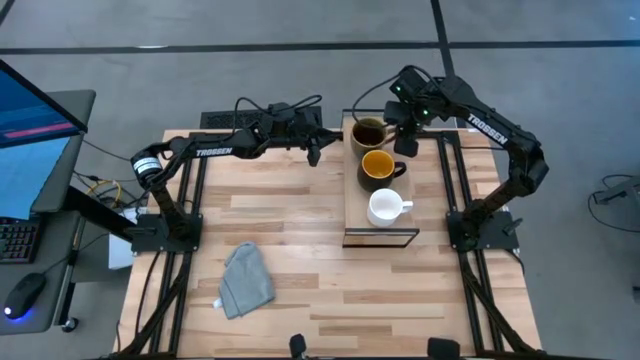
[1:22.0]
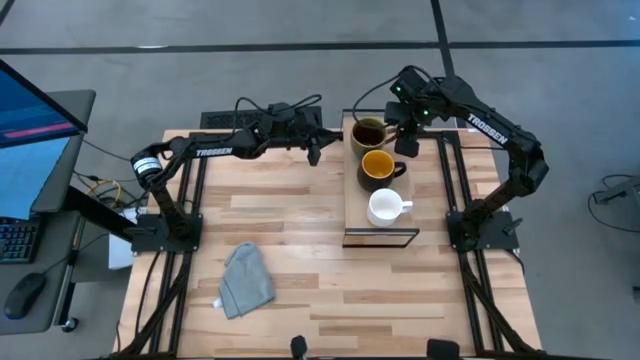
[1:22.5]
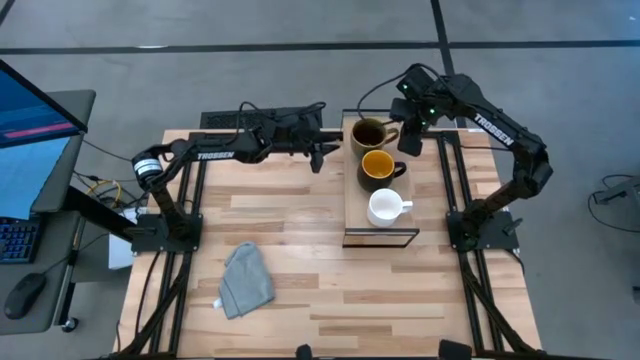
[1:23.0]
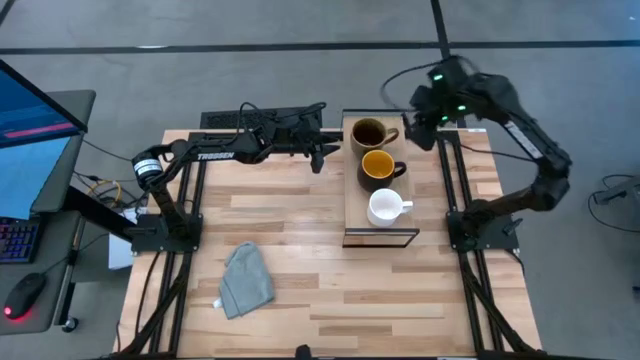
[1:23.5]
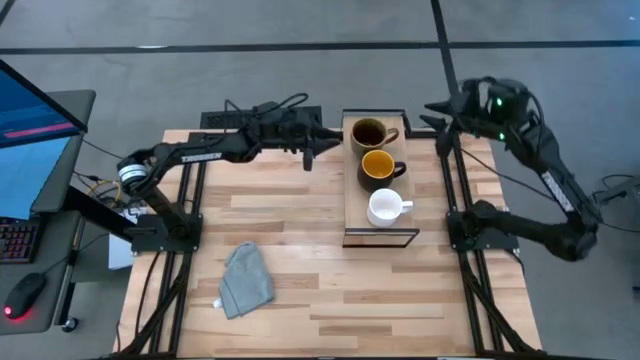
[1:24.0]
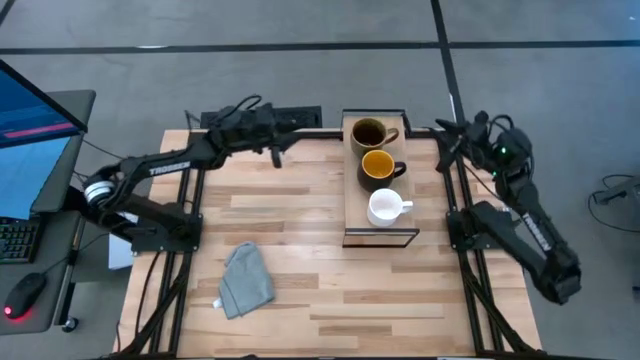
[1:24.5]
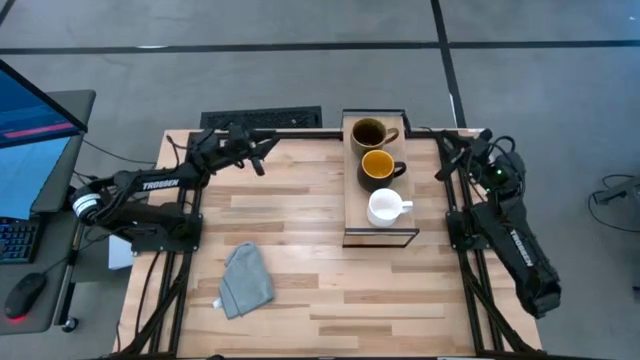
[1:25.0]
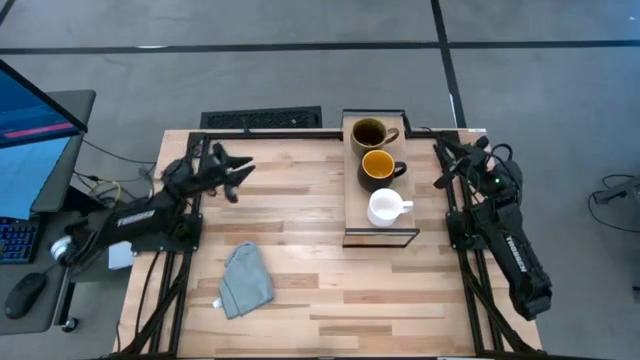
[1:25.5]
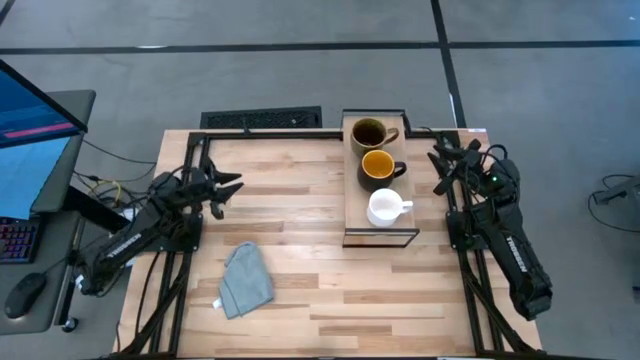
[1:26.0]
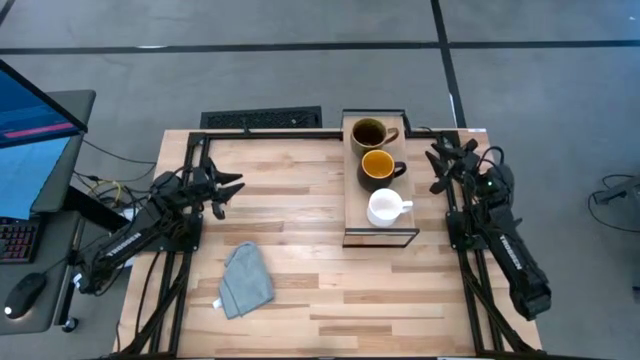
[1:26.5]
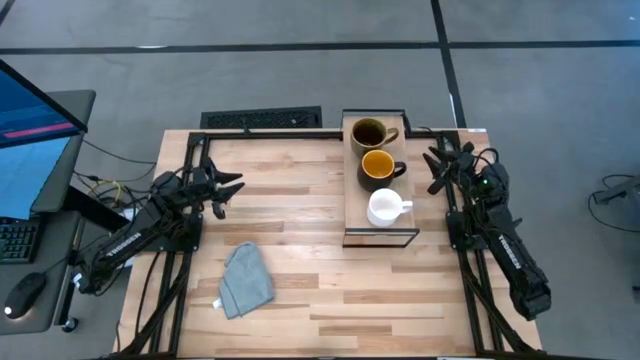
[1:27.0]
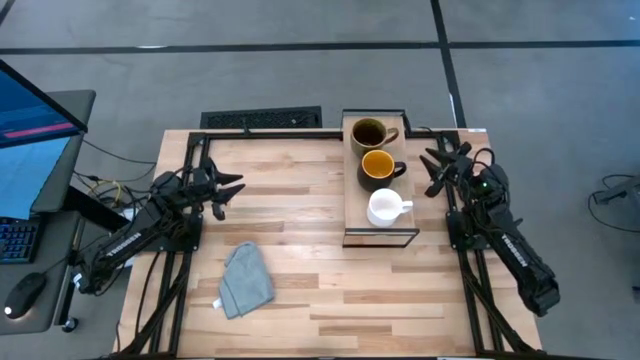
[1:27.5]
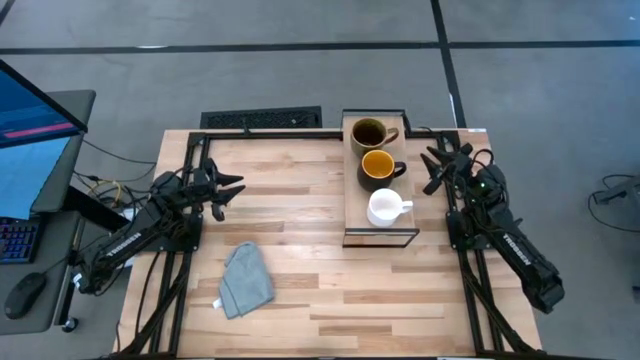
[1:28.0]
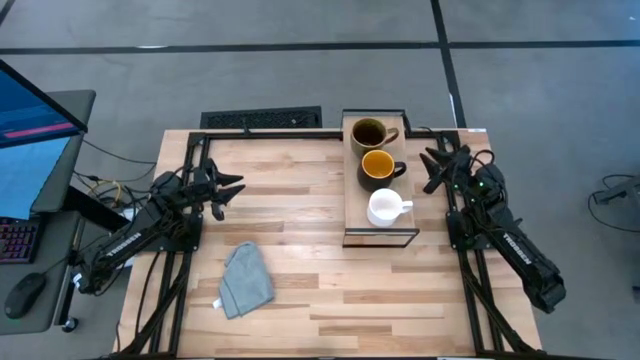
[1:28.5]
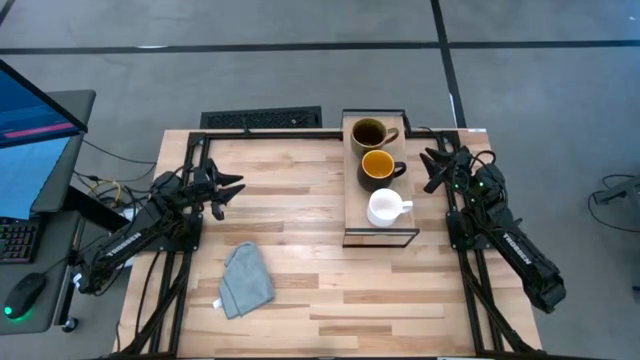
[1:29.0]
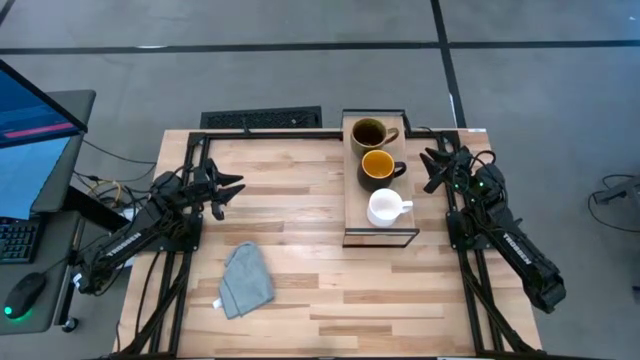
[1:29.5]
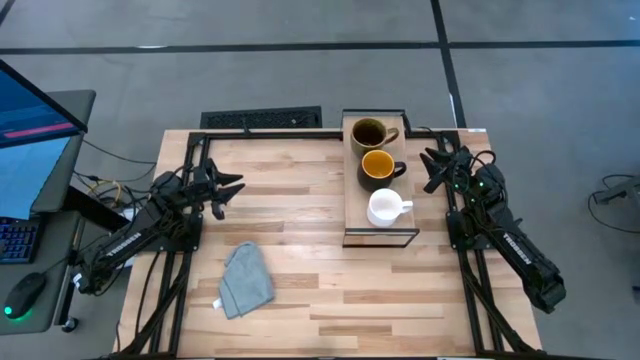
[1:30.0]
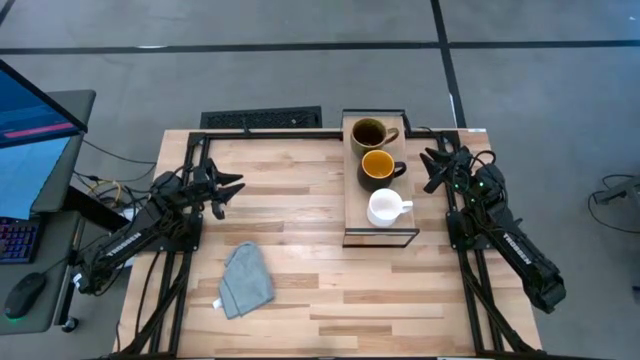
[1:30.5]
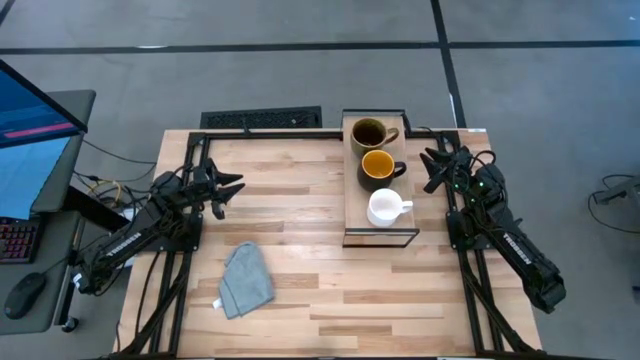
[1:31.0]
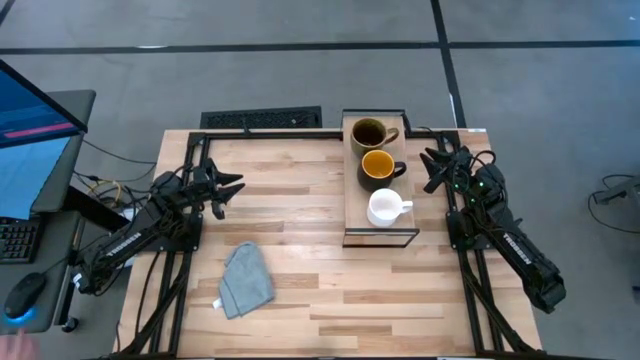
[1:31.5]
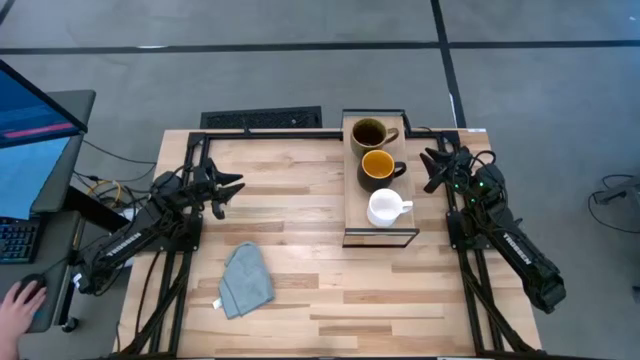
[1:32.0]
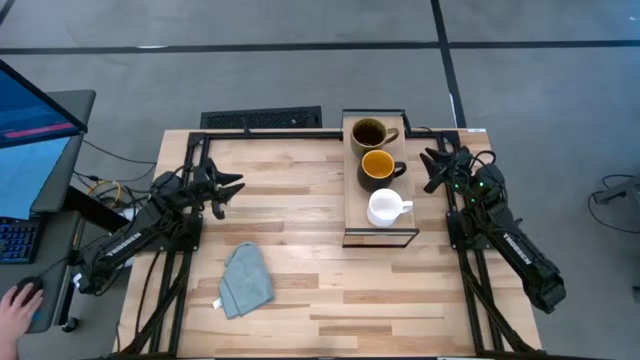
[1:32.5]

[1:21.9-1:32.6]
Task: Stack small to large cups/mugs on shelf
Return to Home Position

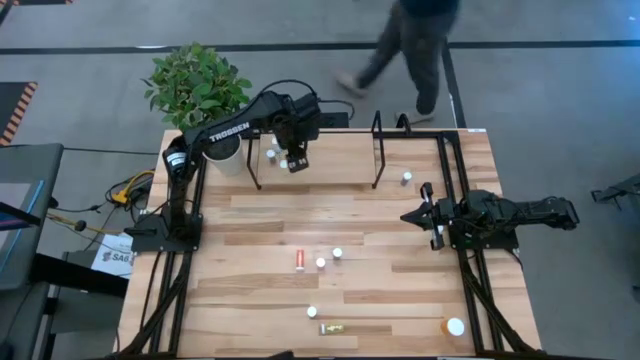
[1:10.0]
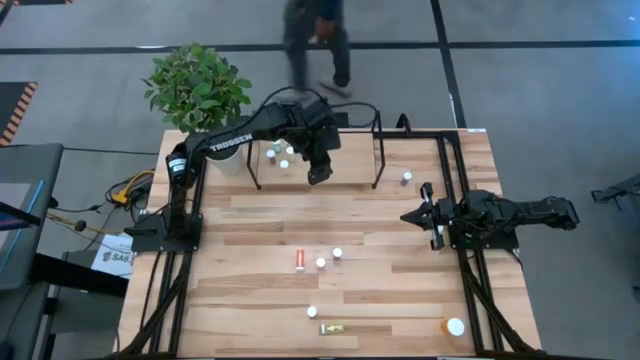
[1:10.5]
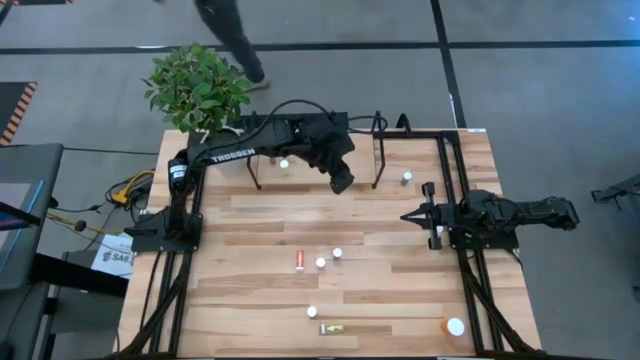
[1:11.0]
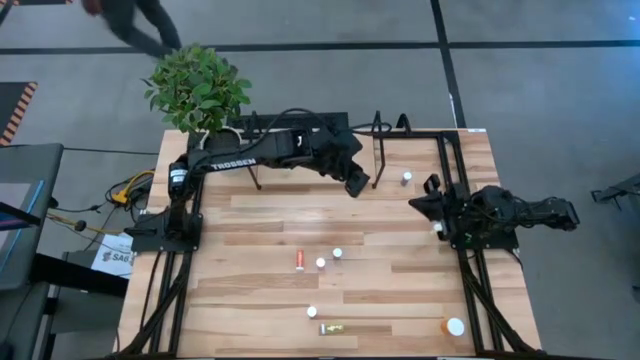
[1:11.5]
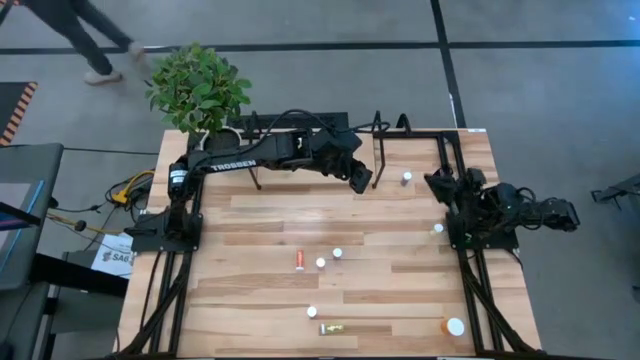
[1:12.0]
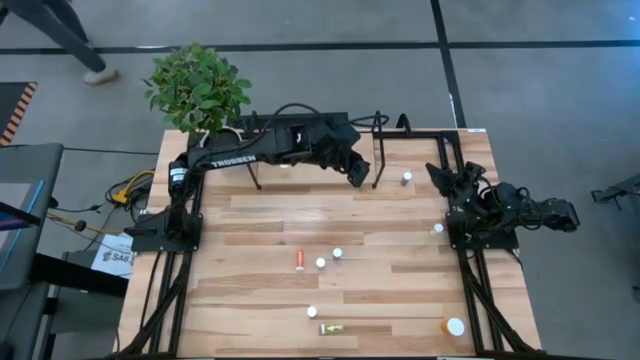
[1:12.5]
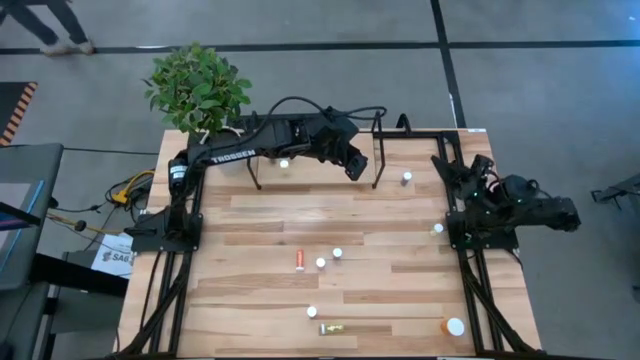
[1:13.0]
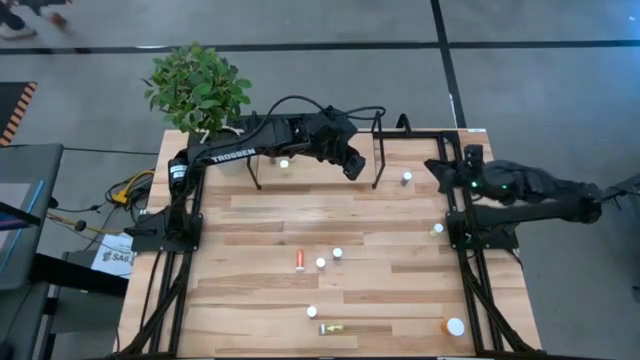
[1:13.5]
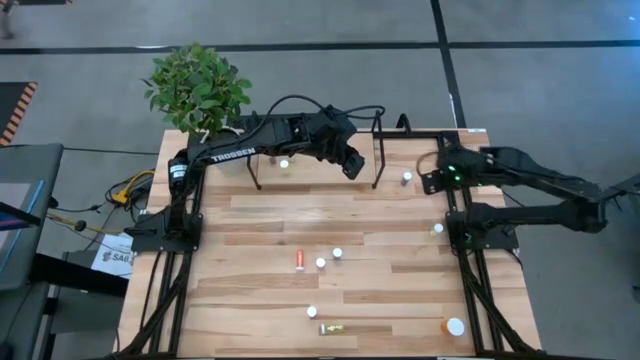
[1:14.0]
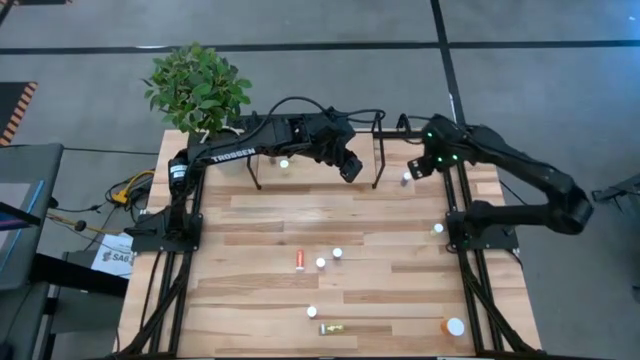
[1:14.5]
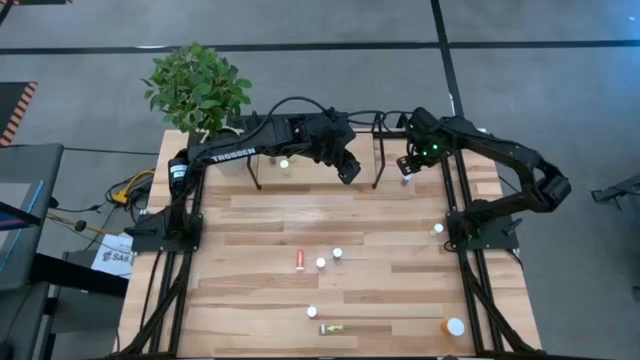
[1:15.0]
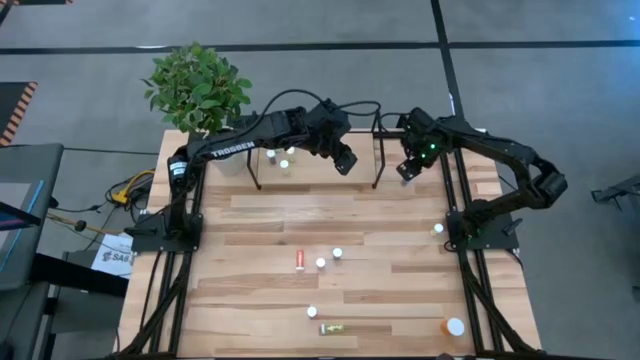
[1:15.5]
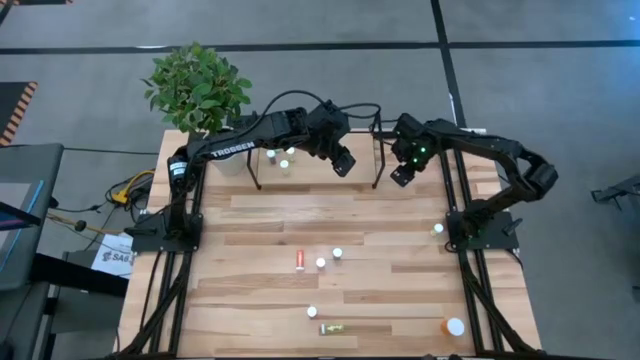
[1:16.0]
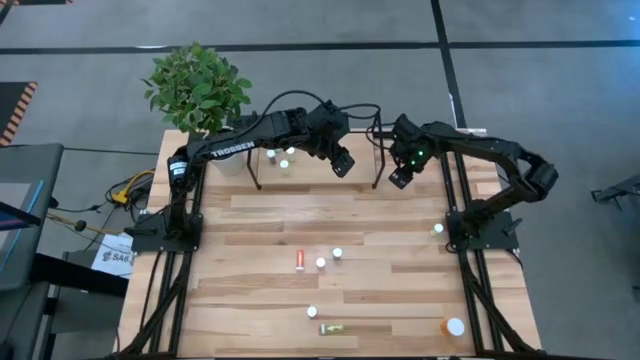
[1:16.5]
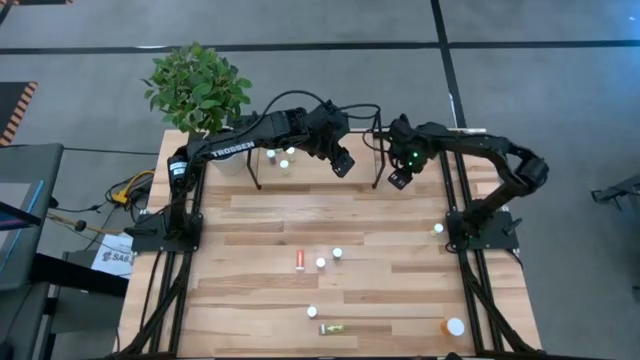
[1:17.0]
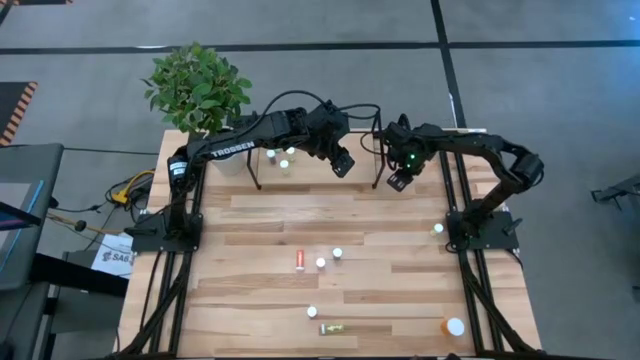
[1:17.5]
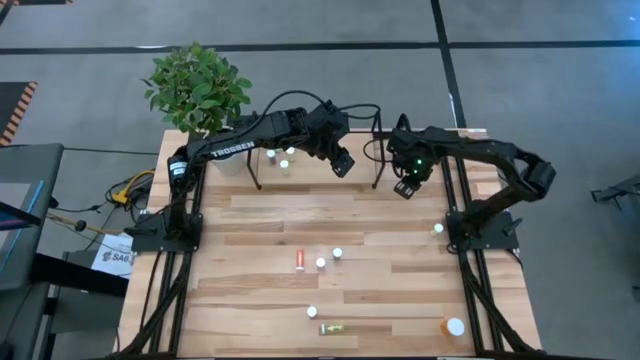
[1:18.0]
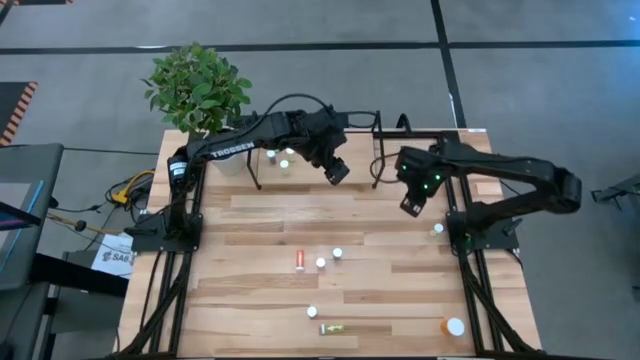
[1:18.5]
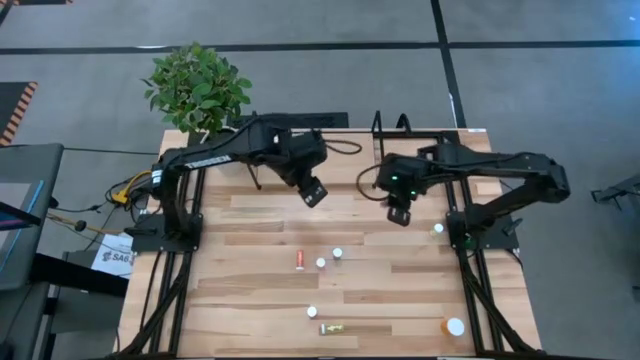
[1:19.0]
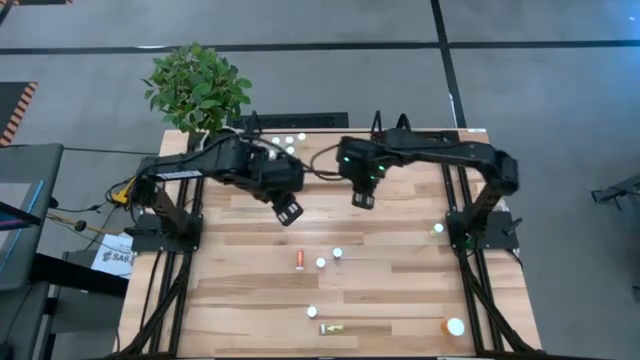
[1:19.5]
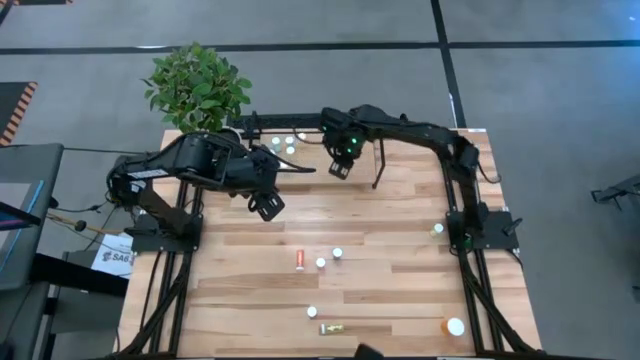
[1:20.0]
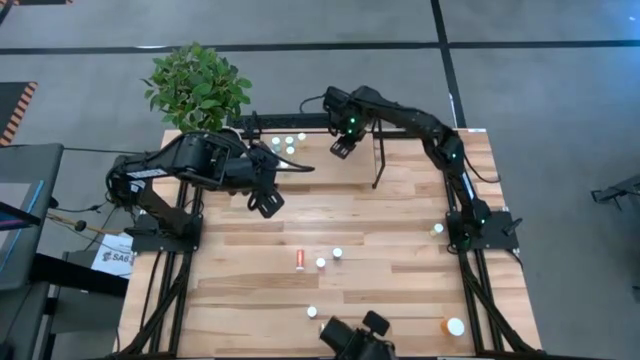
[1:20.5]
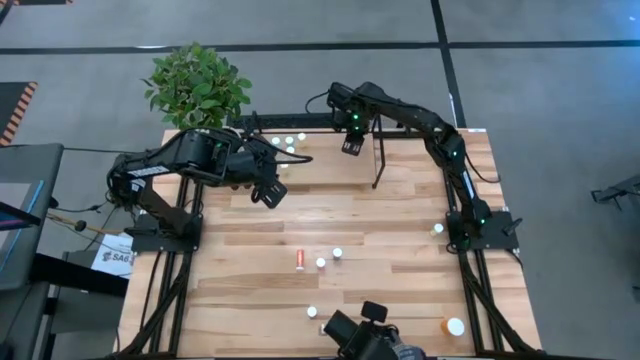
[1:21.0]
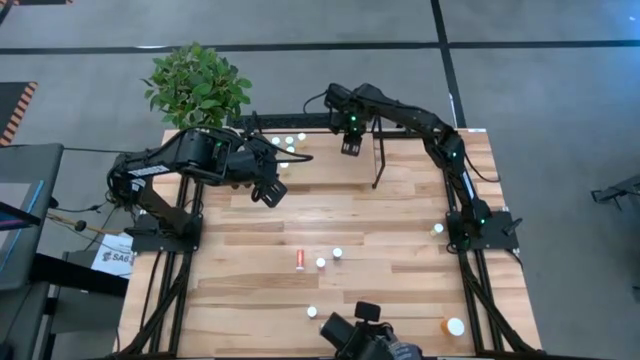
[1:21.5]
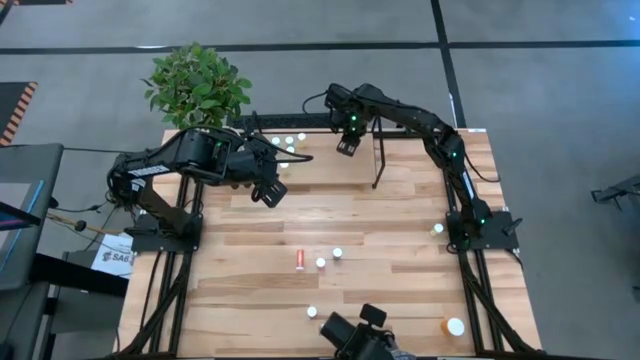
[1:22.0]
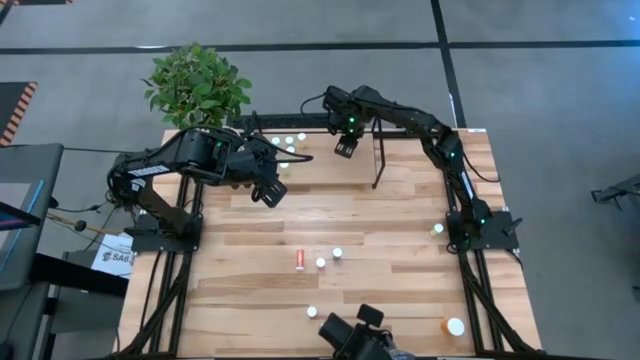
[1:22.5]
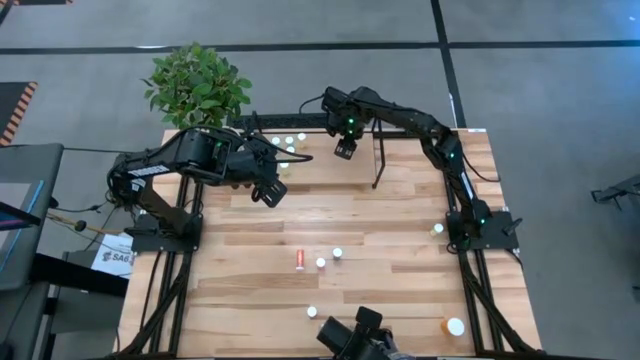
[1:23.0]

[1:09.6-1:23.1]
Task: Pick and place medicine bottles onto shelf by color
Put the blue pill bottle on the shelf
